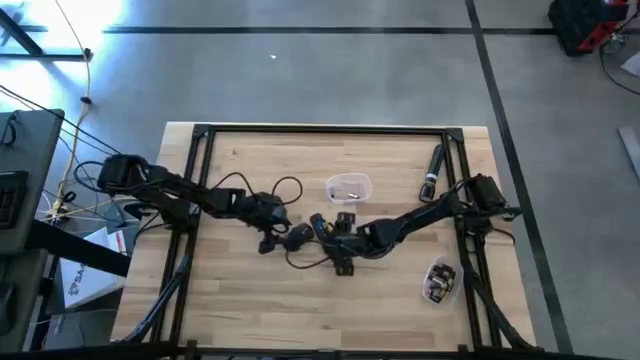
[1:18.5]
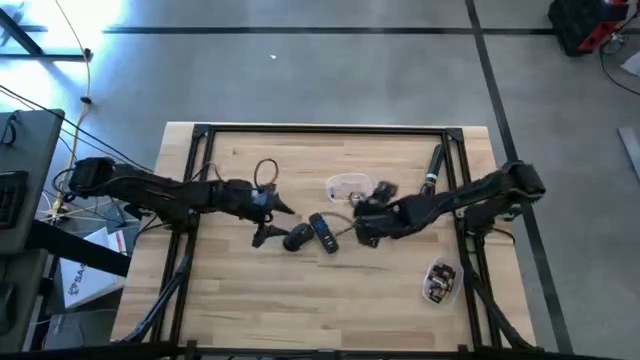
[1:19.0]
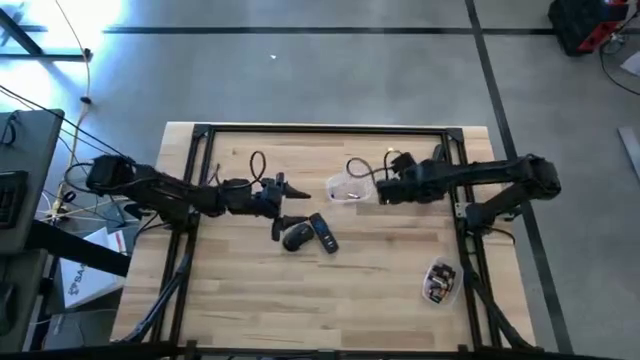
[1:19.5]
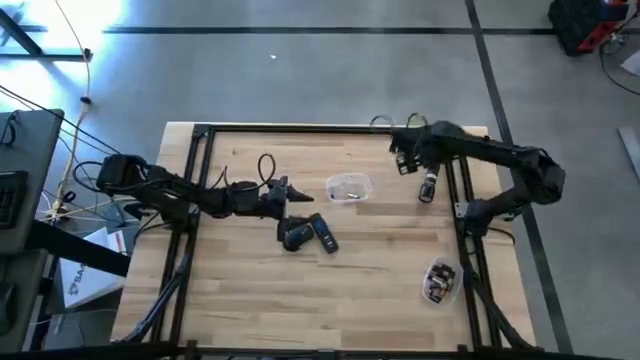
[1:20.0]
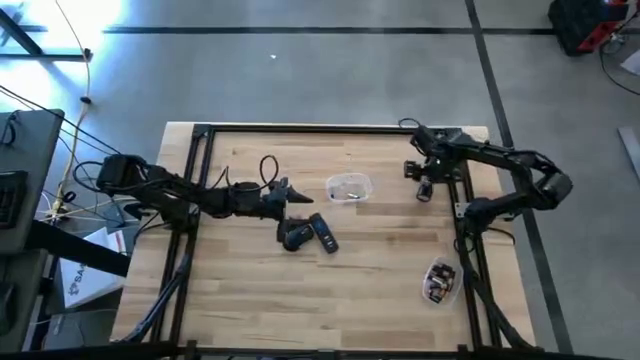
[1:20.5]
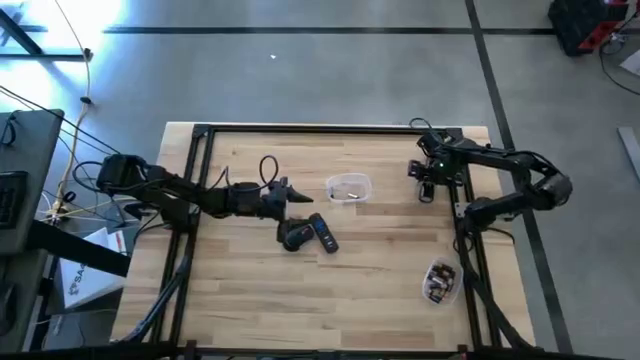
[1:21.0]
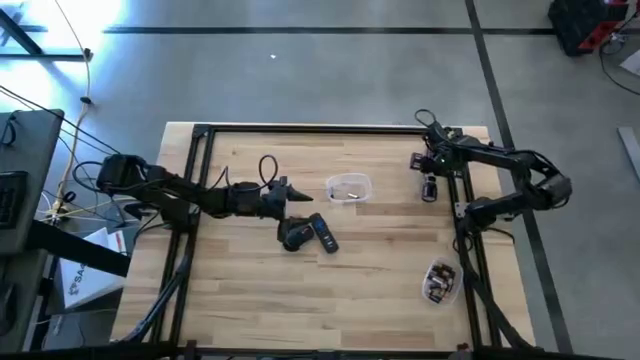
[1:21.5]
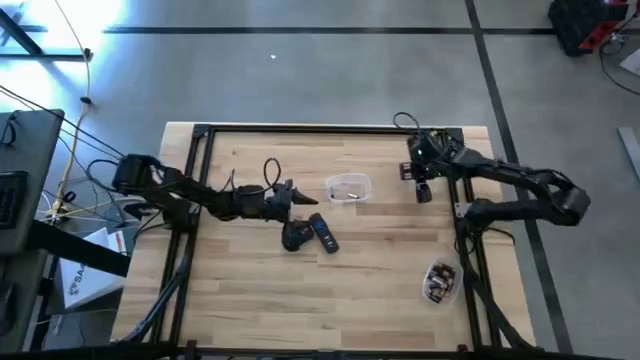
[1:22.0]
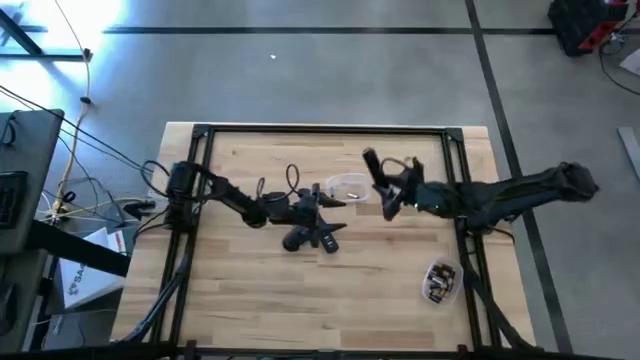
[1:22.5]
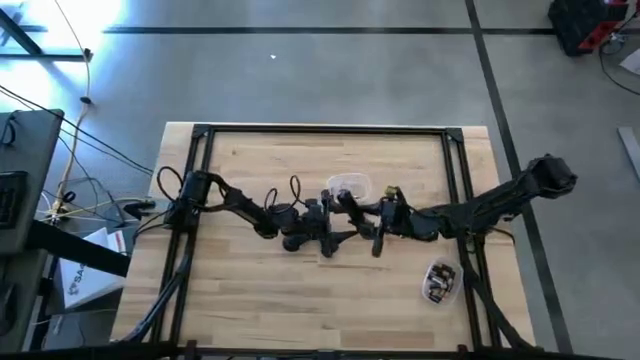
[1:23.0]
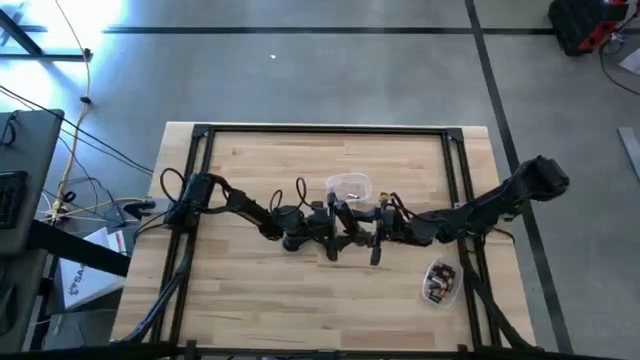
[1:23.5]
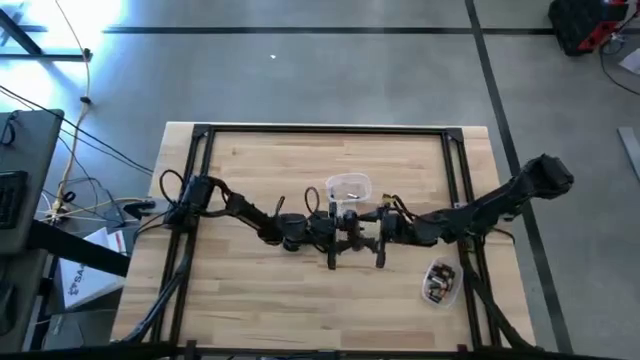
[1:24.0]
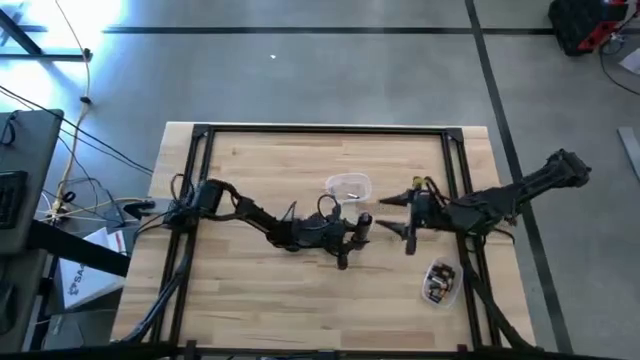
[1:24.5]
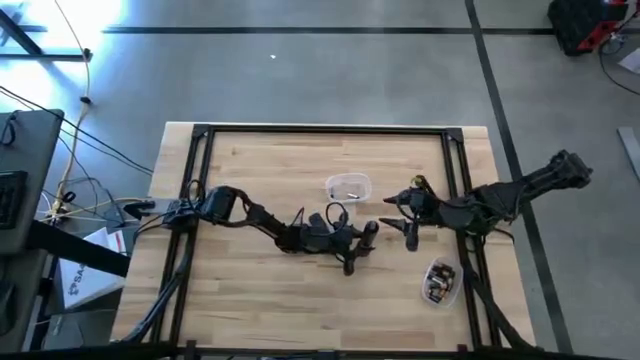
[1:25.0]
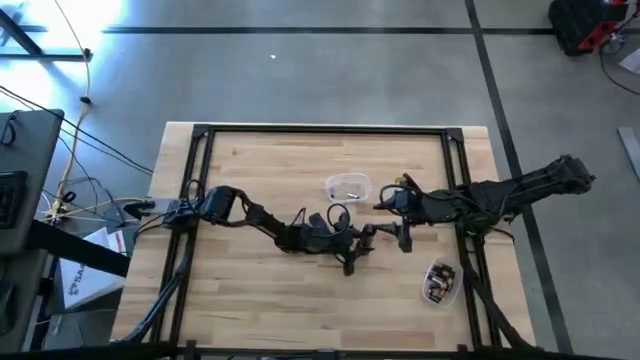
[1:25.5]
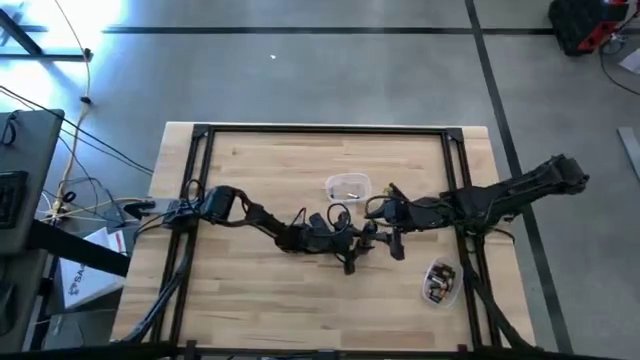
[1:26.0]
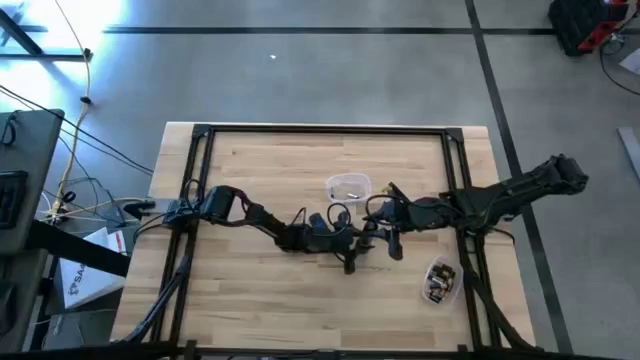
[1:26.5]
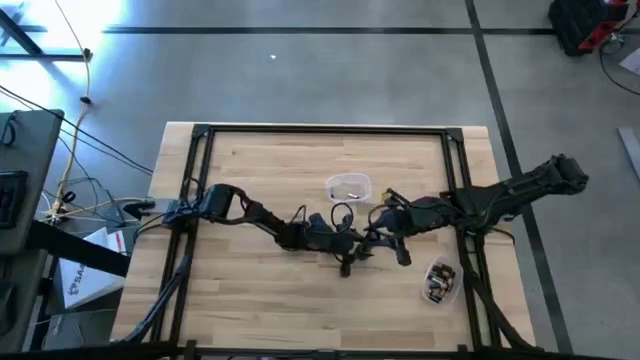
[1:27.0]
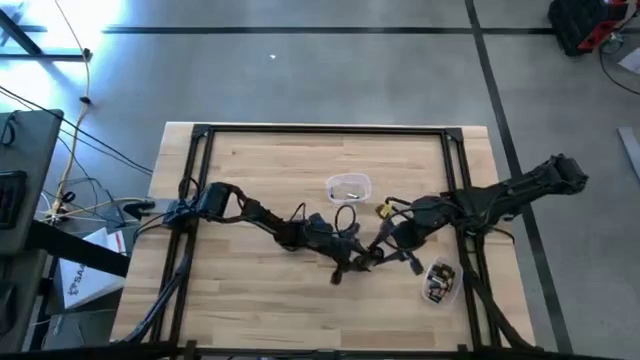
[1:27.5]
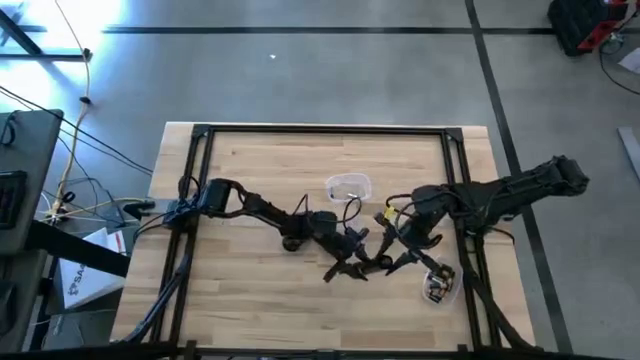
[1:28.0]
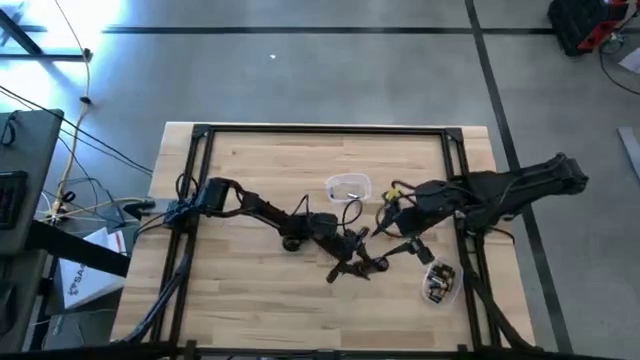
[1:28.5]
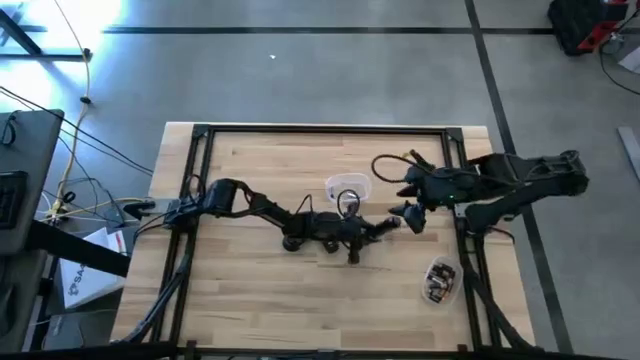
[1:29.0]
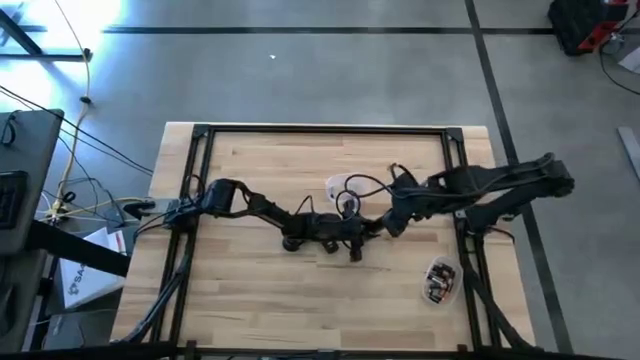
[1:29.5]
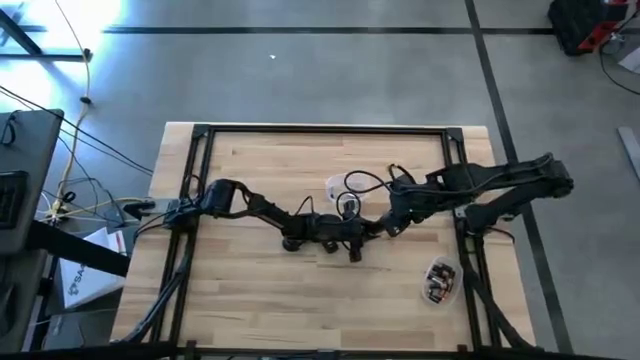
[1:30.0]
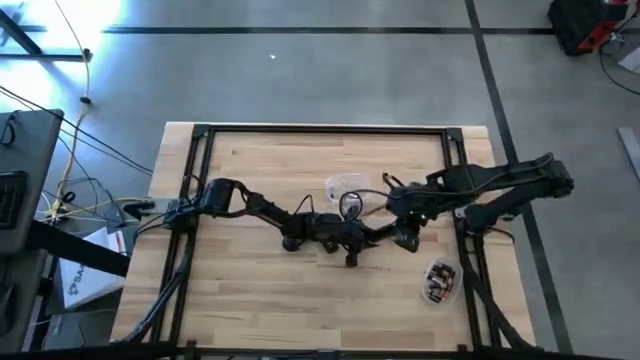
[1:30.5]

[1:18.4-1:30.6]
Task: Insert battery
Open the flashlight cover

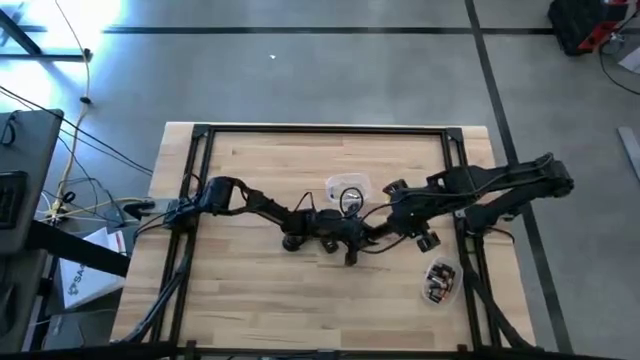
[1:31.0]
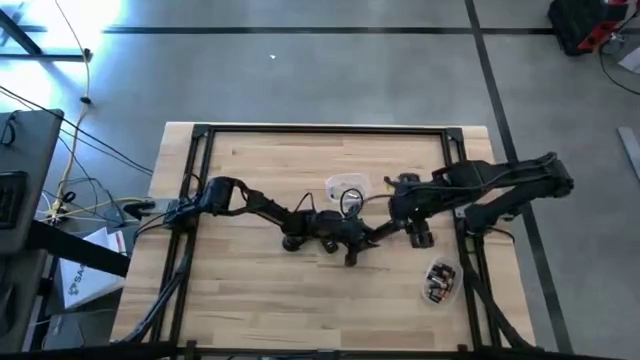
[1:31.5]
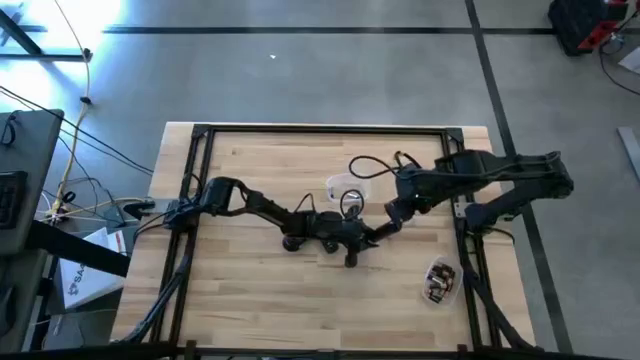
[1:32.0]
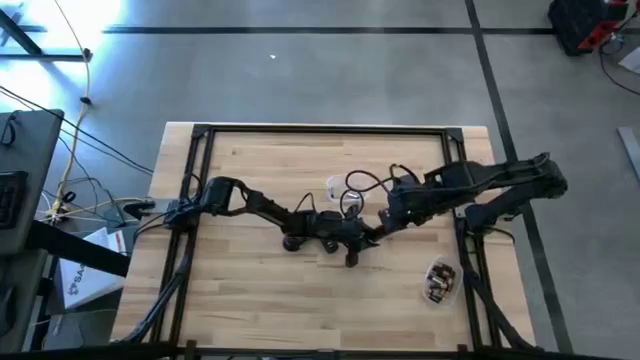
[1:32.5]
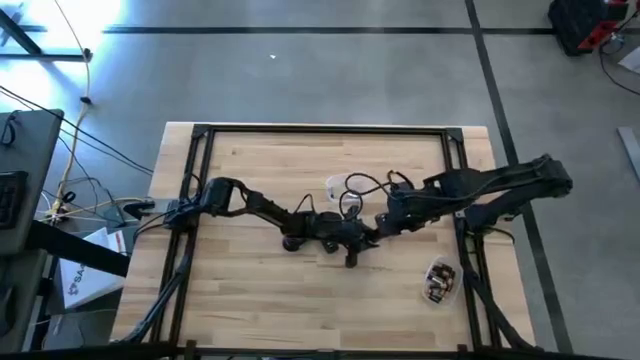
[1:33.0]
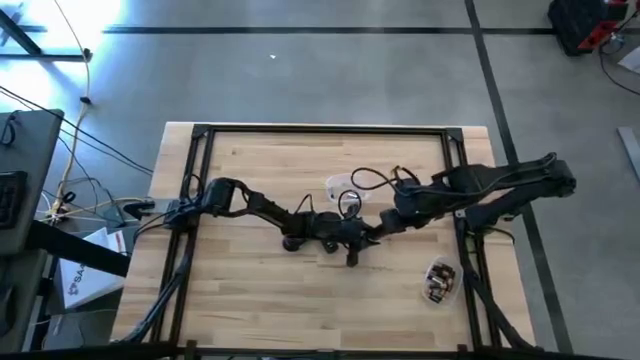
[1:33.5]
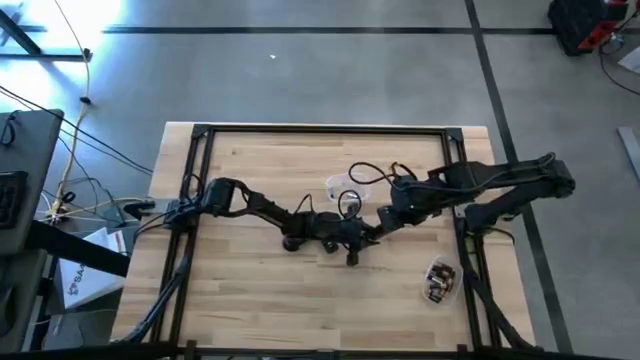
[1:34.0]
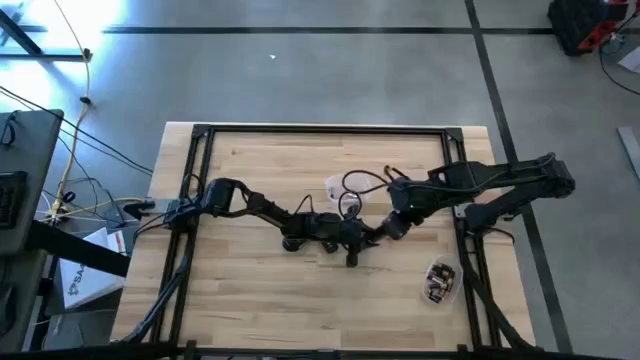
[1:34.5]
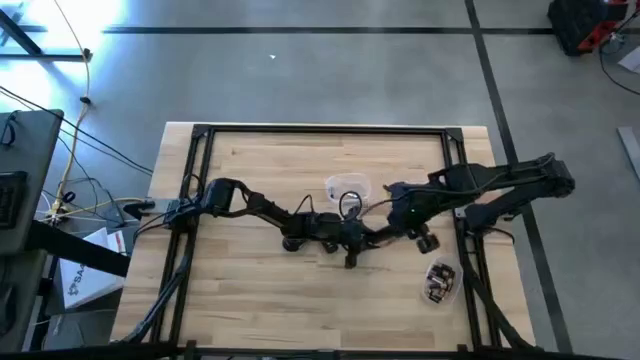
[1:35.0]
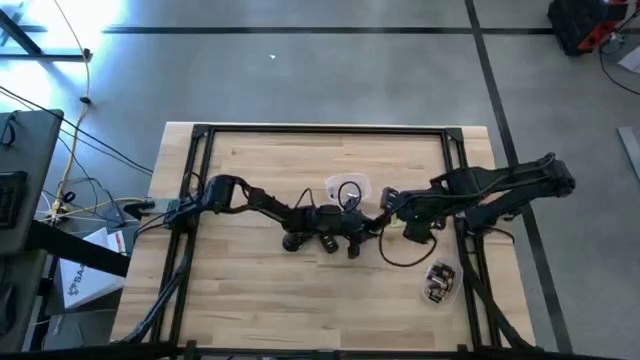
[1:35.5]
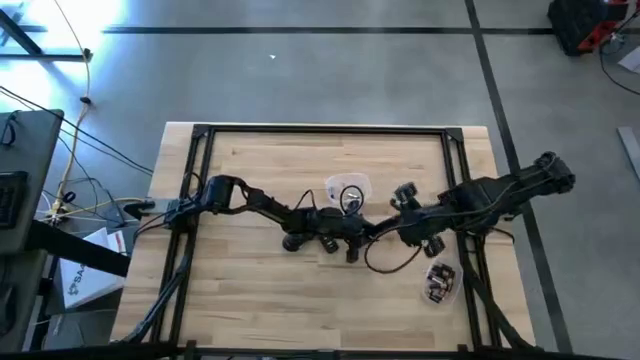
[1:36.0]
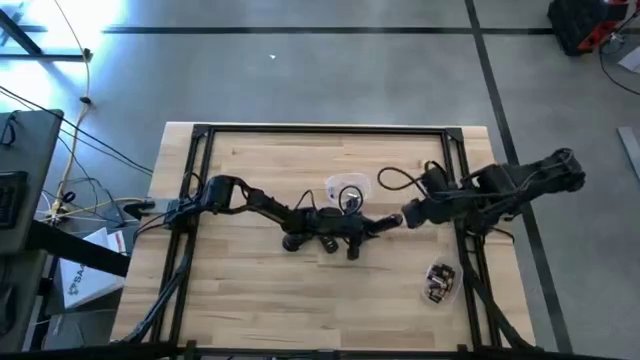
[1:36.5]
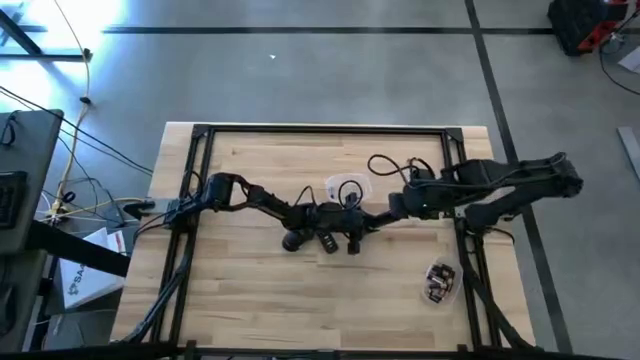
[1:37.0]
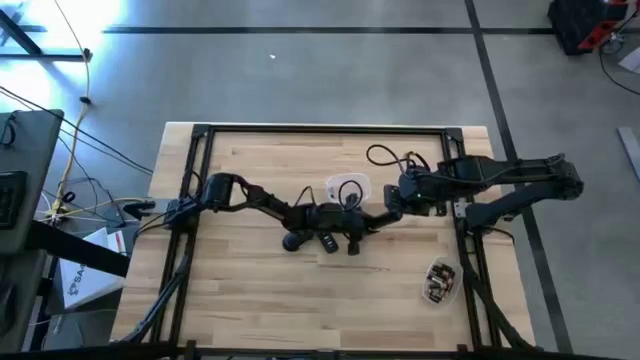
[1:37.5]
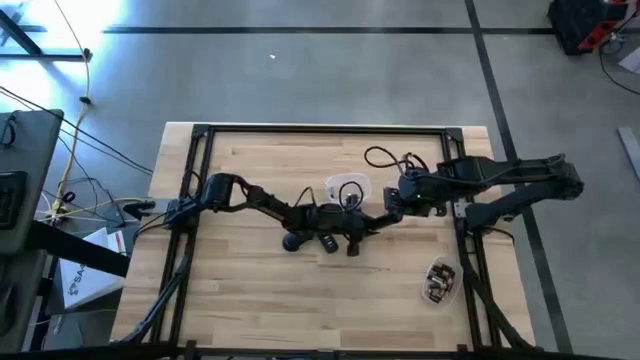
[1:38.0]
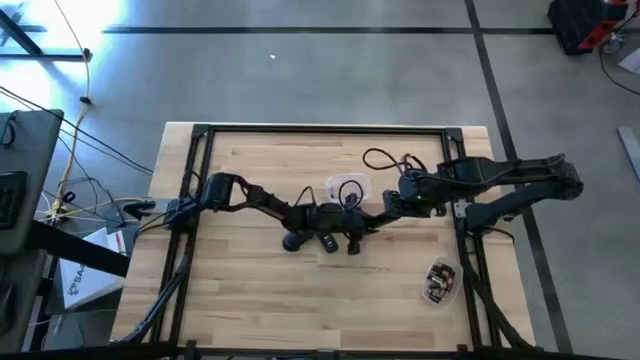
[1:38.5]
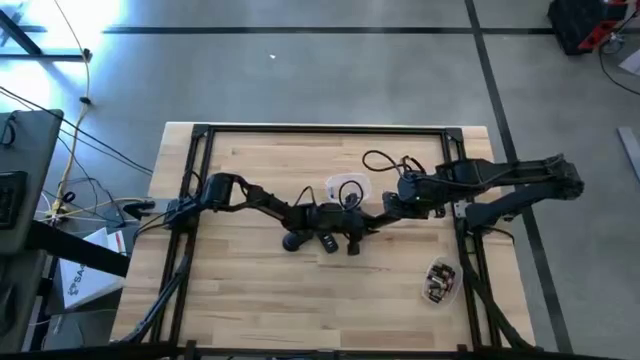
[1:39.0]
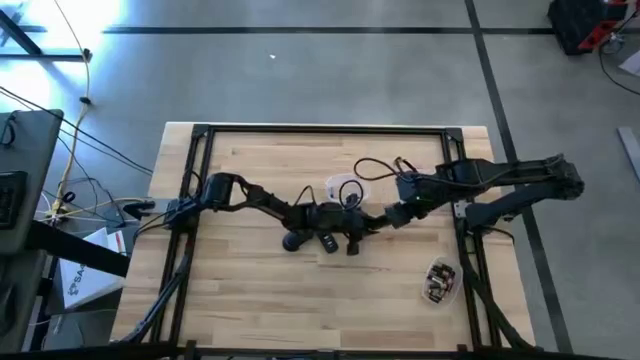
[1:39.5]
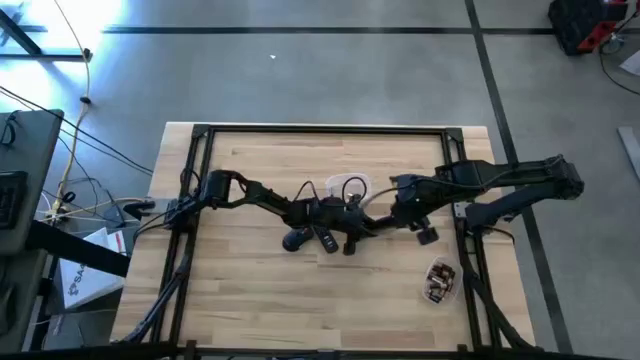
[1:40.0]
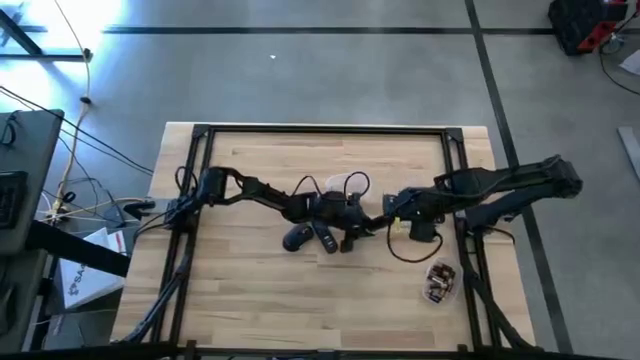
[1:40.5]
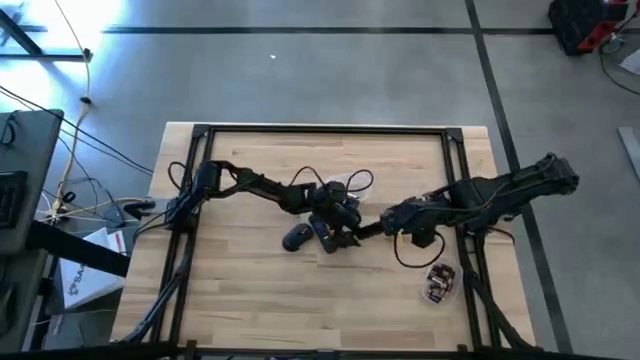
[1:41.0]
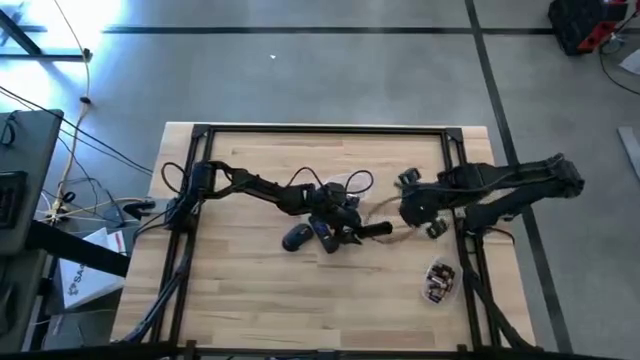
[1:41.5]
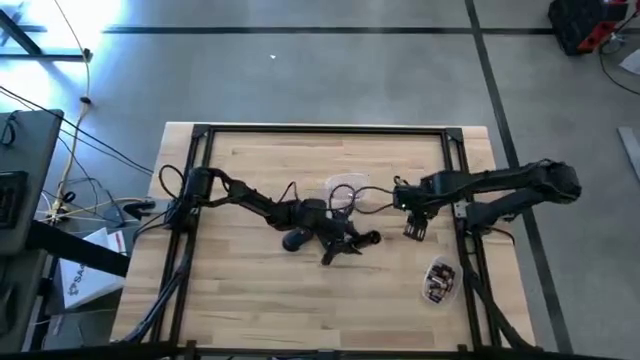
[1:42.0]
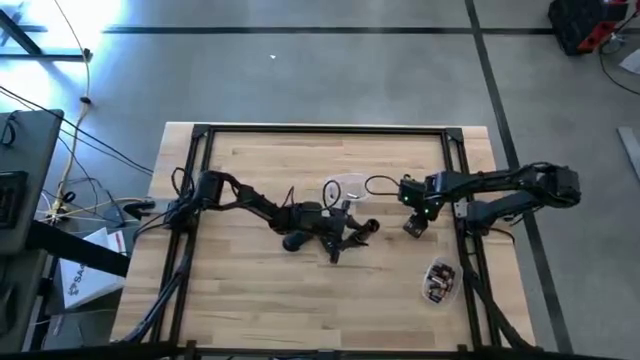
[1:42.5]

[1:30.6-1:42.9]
Open the flashlight cover
